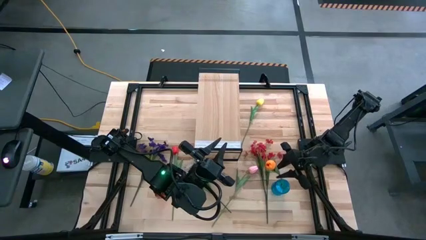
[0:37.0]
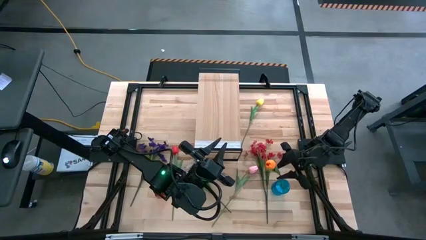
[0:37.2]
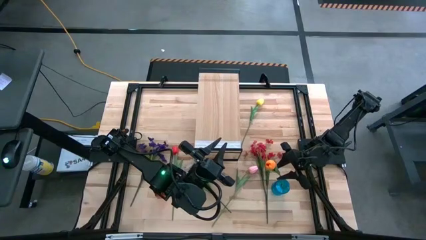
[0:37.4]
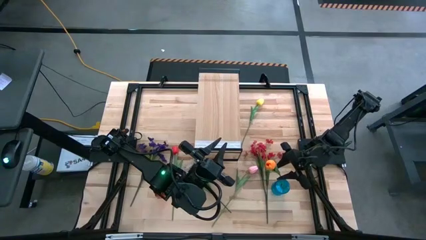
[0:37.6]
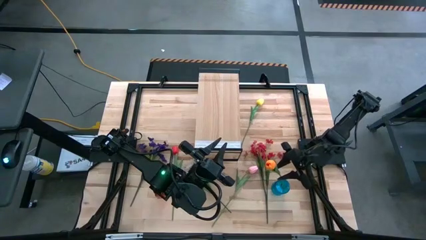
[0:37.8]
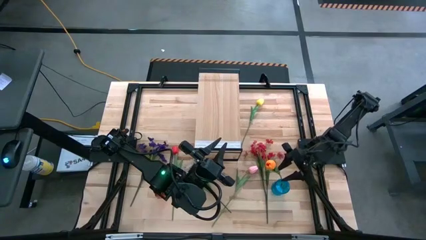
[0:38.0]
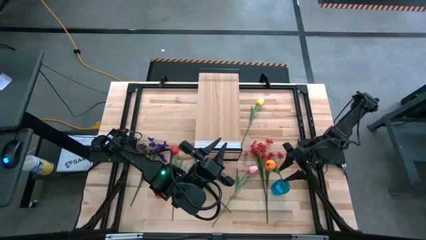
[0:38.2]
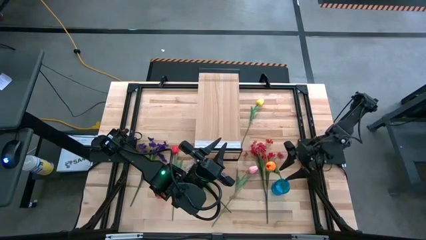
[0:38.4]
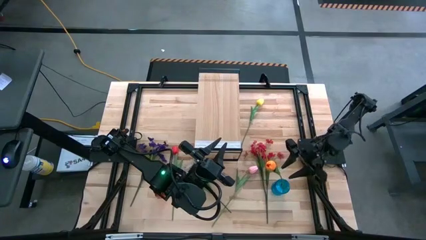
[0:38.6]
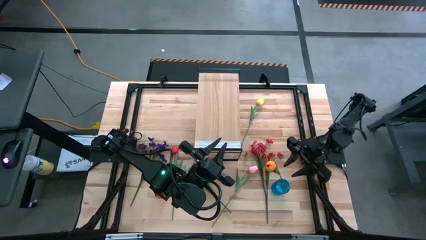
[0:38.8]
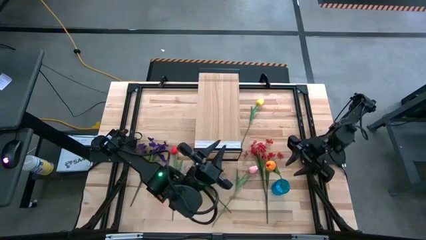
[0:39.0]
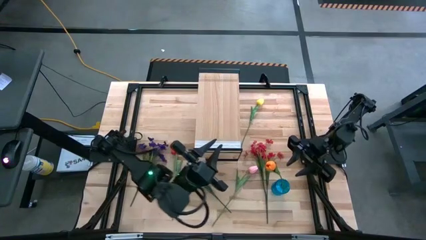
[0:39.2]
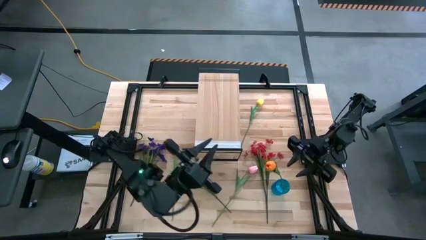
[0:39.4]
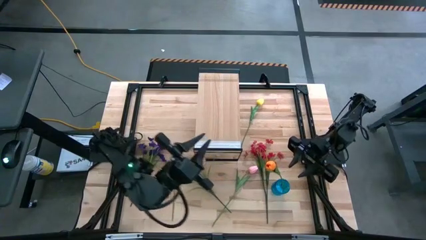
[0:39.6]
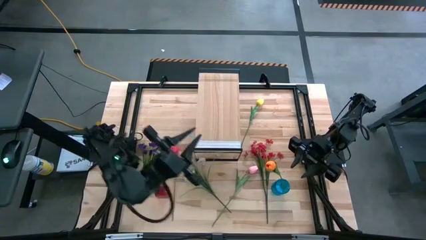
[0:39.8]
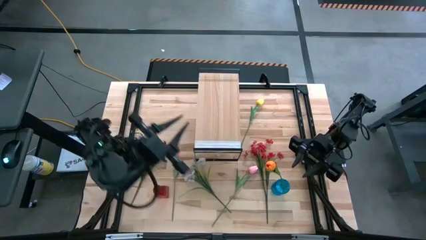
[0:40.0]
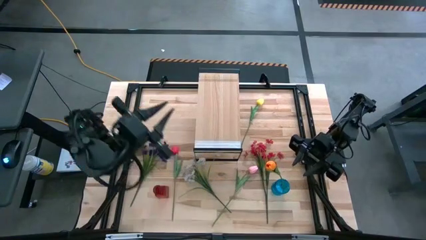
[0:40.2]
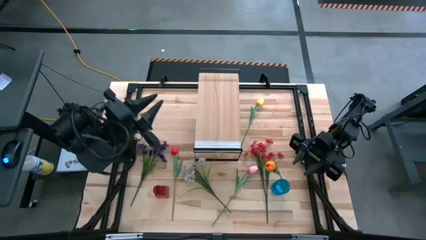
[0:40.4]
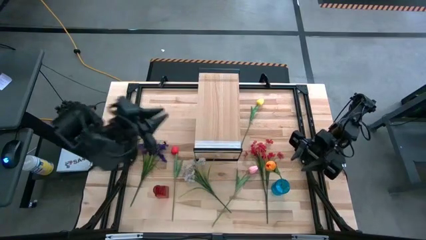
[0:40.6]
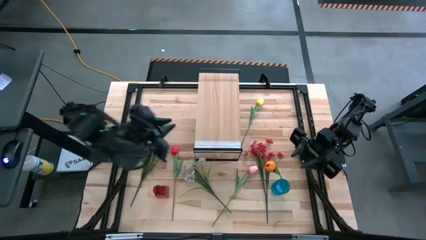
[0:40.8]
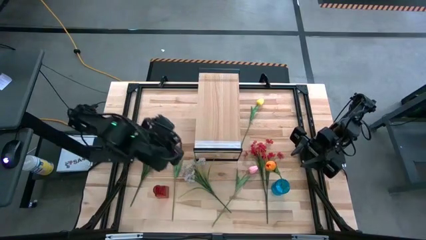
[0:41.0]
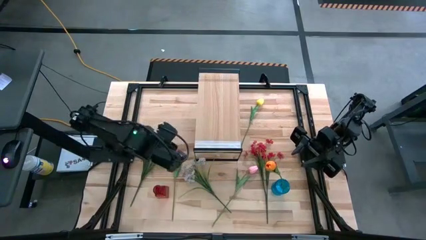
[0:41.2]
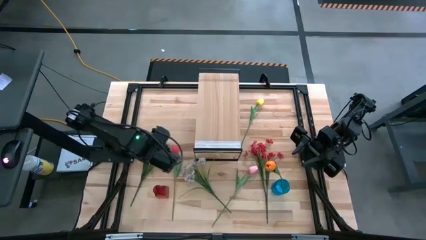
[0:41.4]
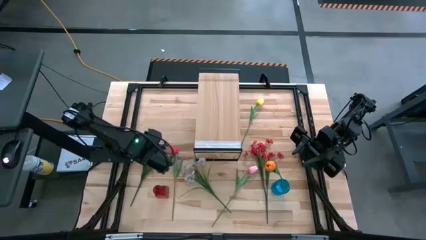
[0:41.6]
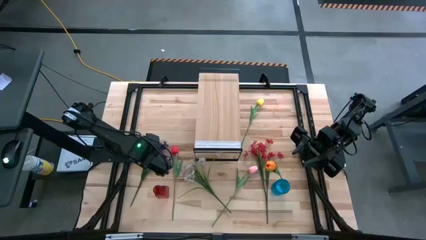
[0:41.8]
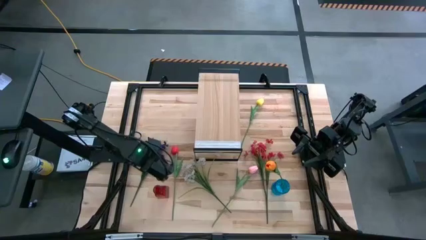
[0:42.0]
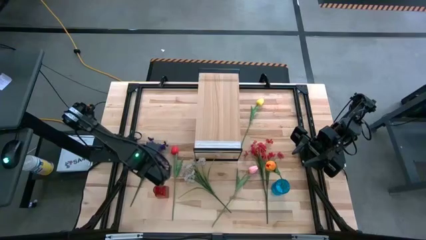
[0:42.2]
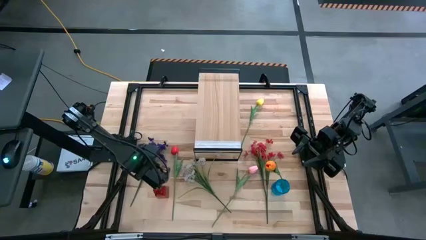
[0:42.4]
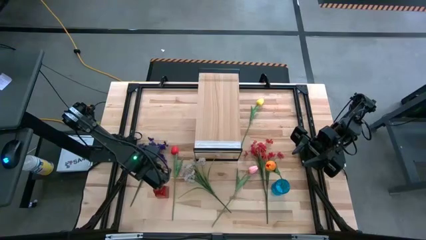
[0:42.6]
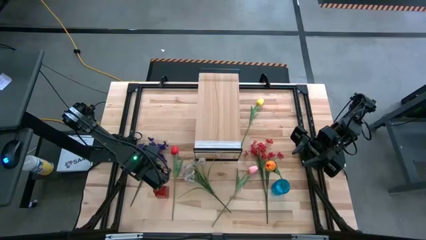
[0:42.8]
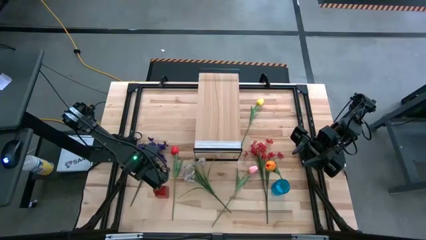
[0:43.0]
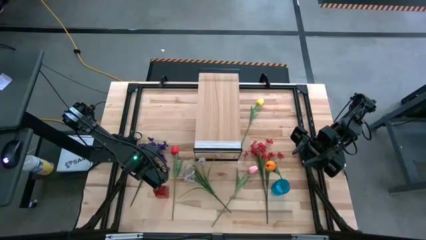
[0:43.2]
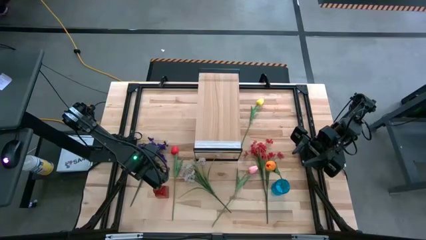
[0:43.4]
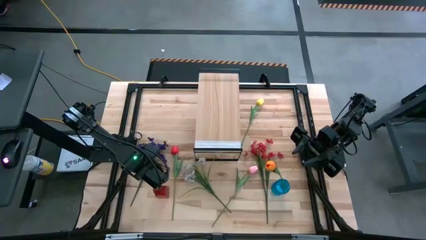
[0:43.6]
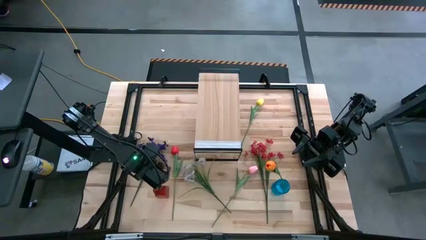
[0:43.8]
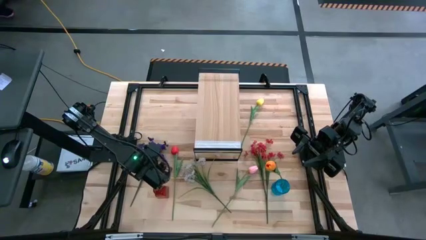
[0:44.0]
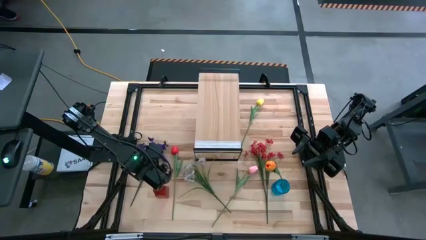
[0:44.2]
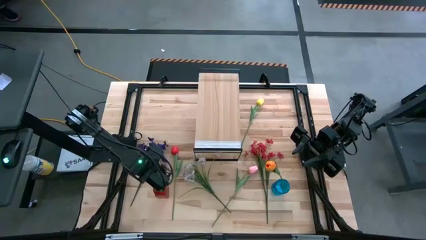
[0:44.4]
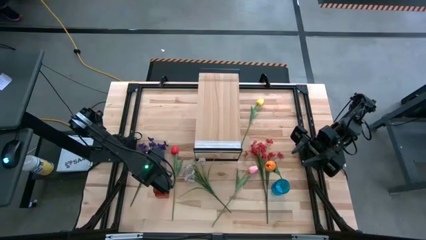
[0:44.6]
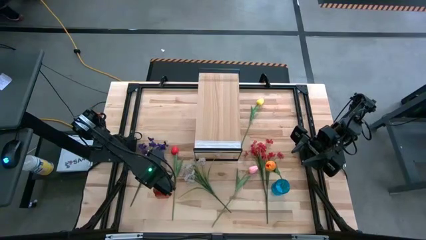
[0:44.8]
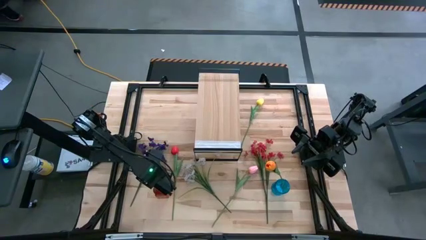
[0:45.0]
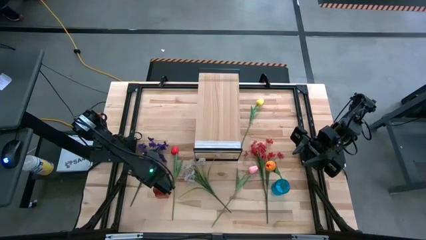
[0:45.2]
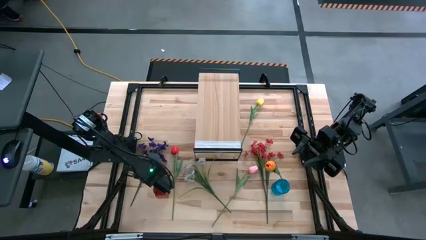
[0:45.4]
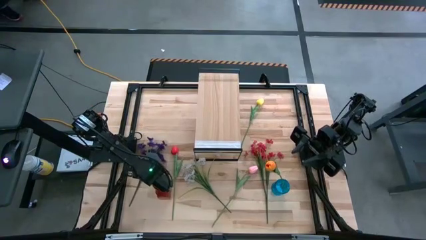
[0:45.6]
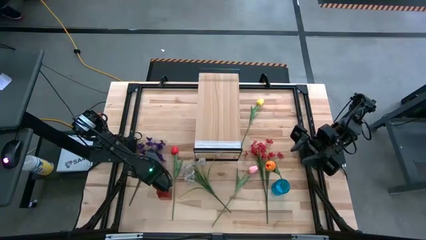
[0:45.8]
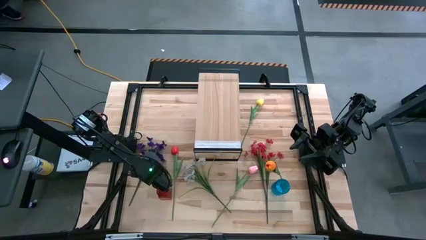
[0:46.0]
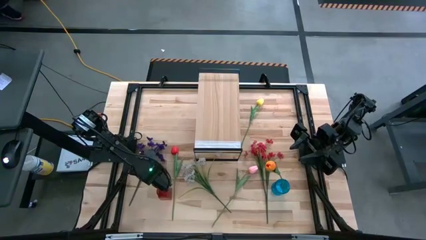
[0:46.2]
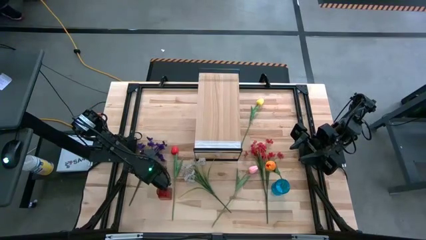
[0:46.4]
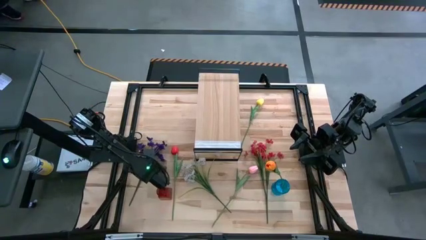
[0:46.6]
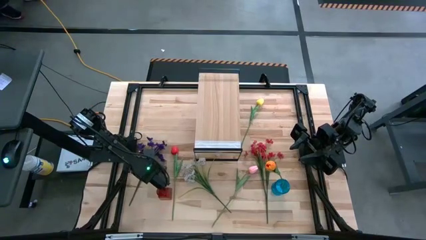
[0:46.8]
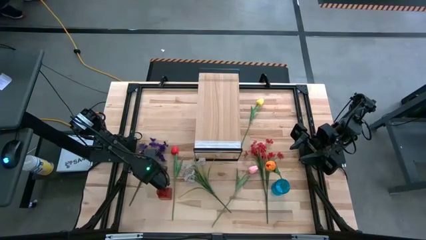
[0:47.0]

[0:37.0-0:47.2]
Task: Pick and place flowers into a vace then onto a shelf
Put the purple flowers into the red vase
